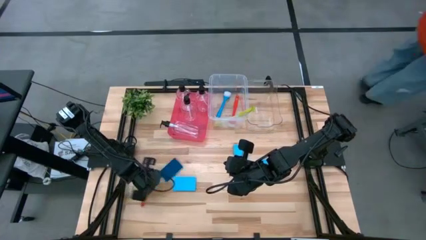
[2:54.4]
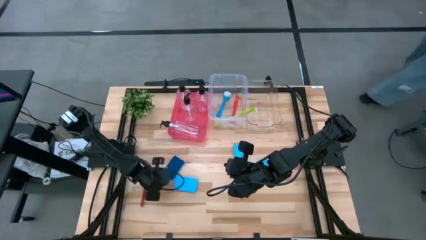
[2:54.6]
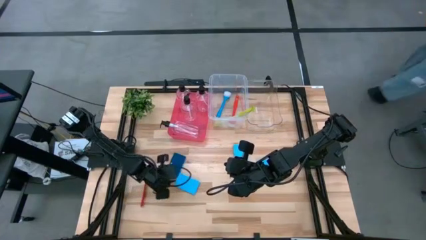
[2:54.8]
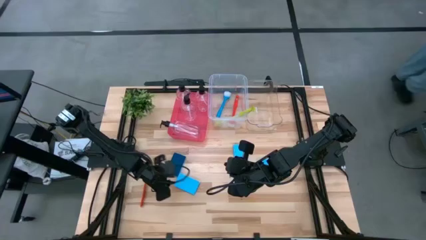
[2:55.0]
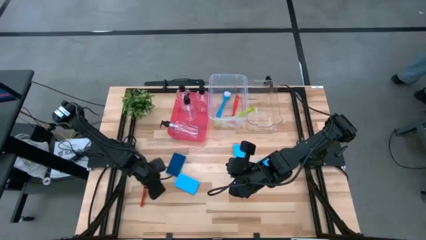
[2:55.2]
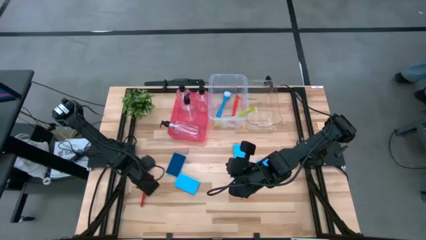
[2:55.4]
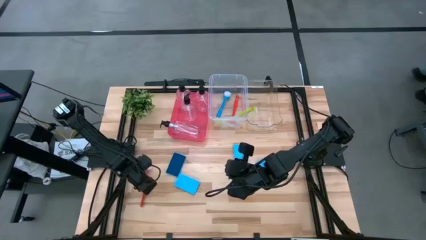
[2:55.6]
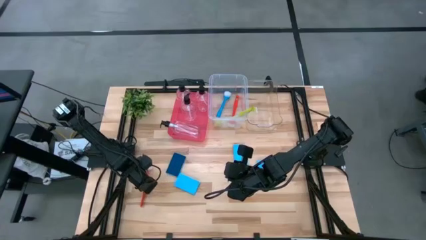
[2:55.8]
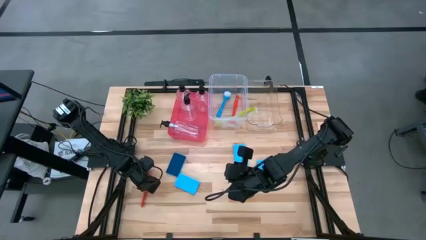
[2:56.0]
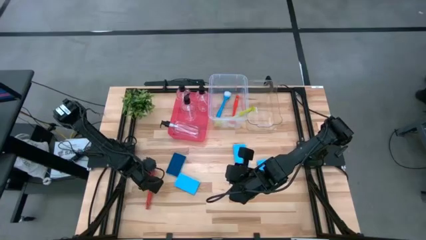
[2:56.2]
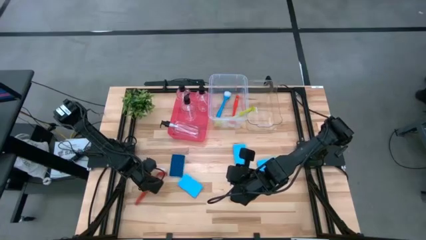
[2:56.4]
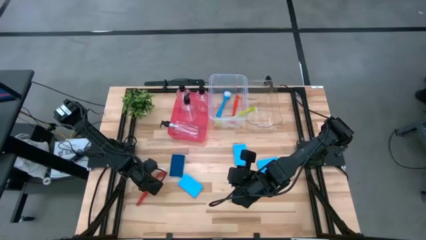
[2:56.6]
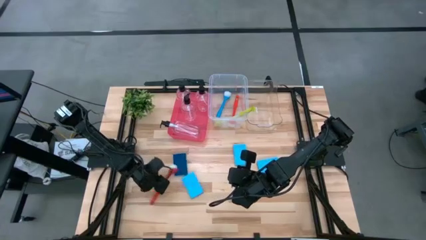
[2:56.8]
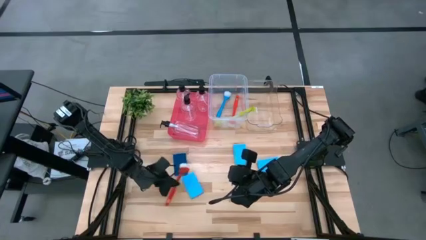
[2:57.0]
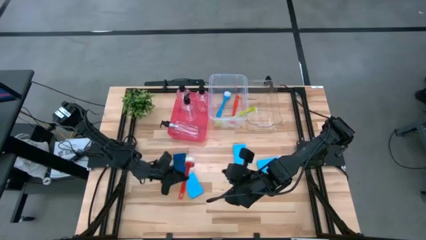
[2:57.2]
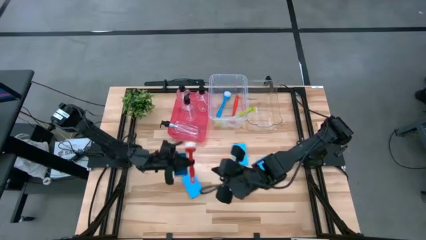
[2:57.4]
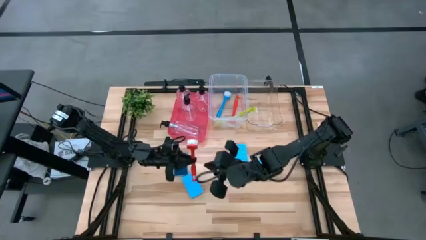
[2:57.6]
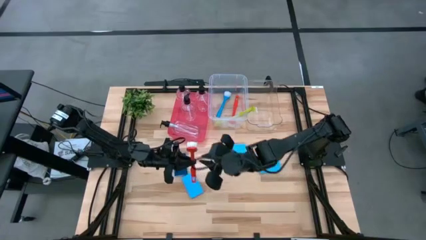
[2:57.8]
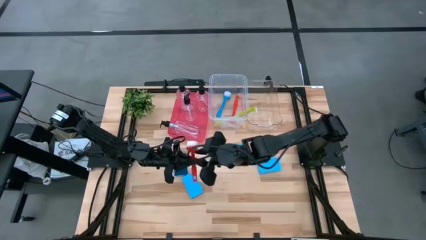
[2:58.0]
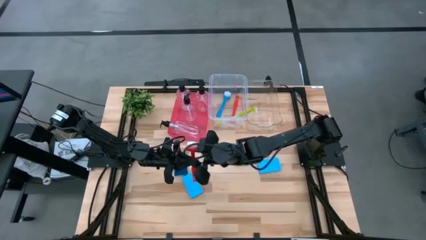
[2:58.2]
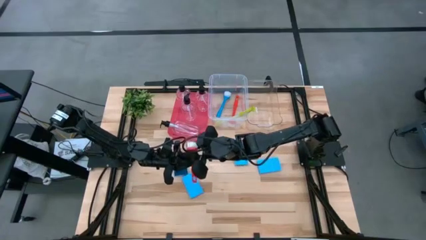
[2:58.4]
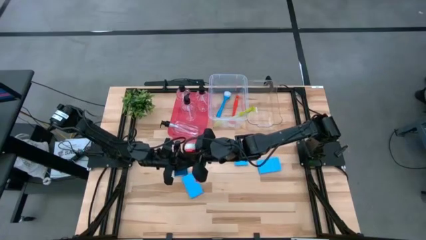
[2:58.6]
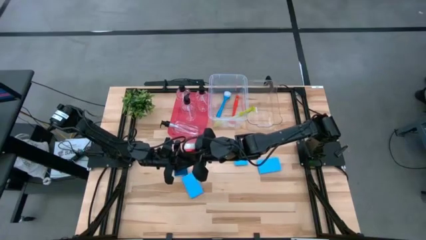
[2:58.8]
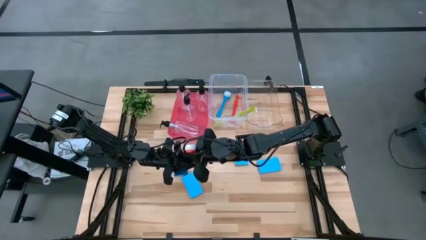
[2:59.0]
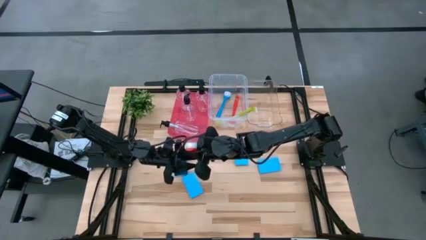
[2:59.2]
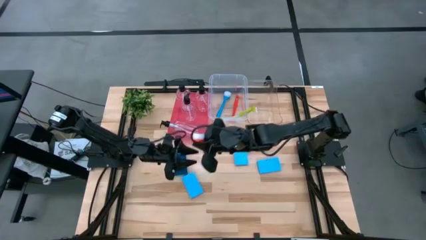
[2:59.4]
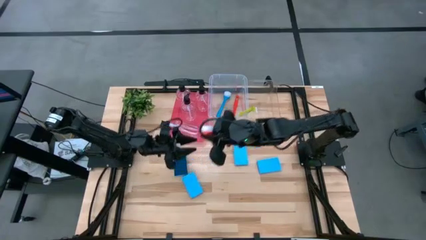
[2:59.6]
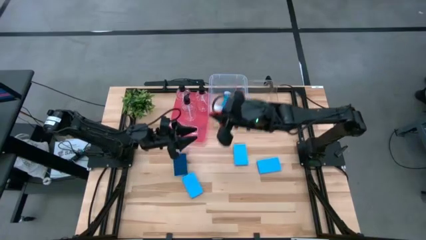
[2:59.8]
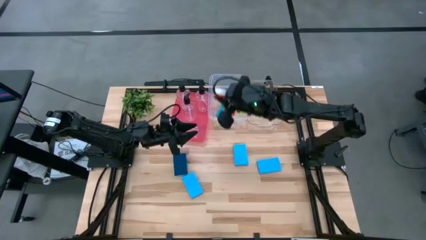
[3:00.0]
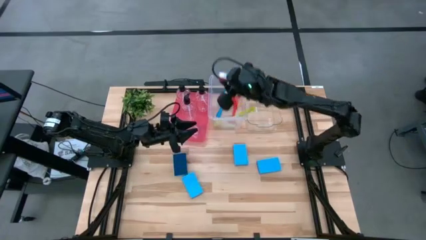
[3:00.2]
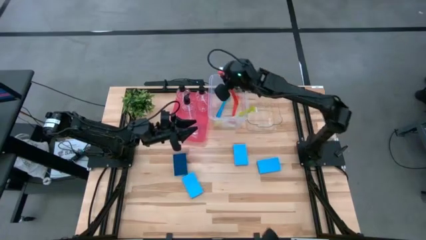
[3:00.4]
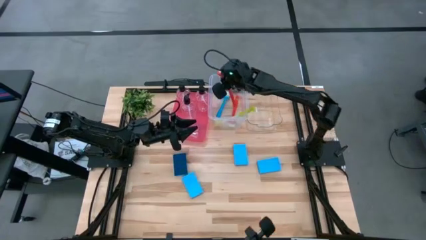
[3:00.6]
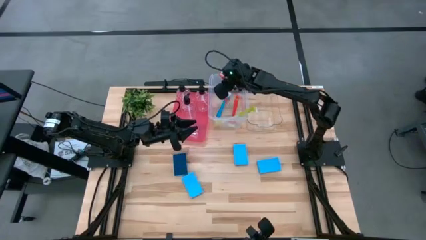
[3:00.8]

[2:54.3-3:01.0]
Task: Pick & Place Kitchen Sink Supplies
Put the red dishwashing brush into the transparent white bin

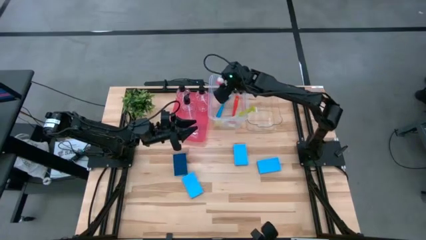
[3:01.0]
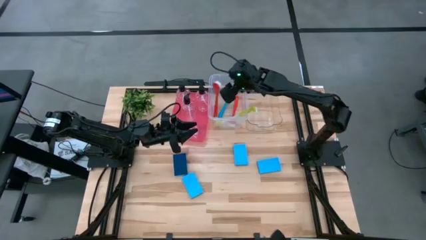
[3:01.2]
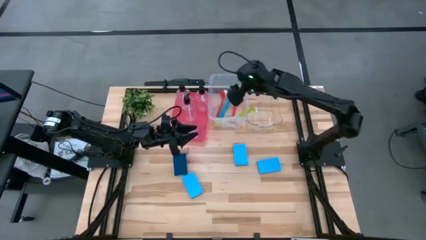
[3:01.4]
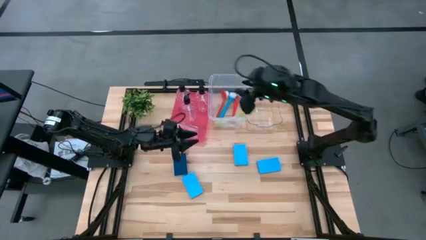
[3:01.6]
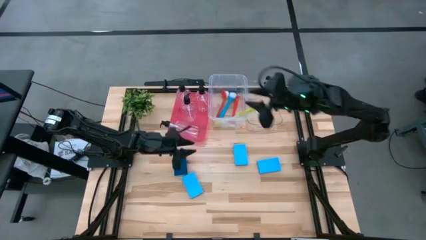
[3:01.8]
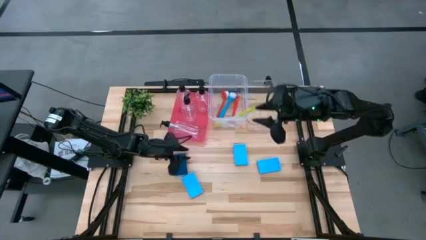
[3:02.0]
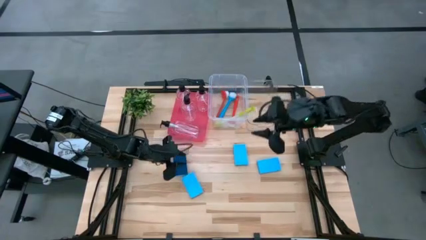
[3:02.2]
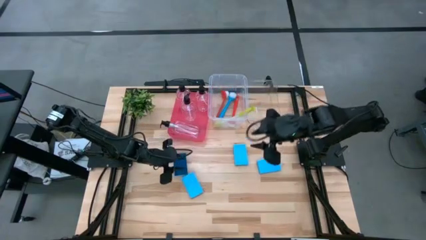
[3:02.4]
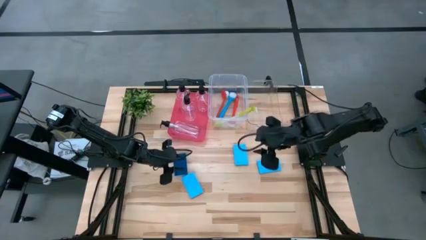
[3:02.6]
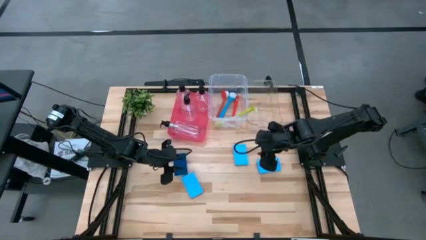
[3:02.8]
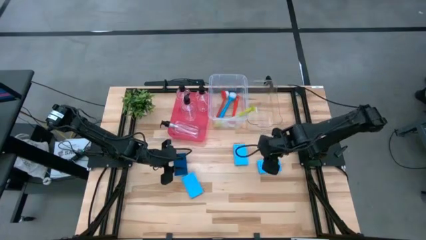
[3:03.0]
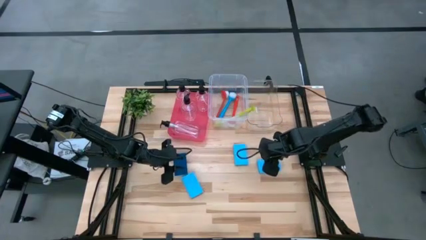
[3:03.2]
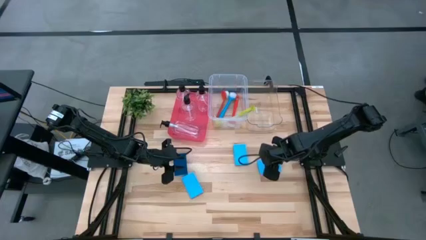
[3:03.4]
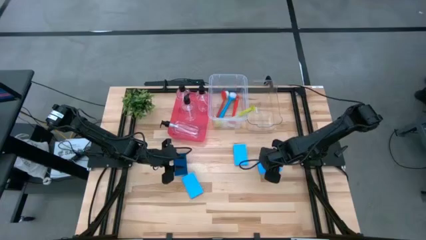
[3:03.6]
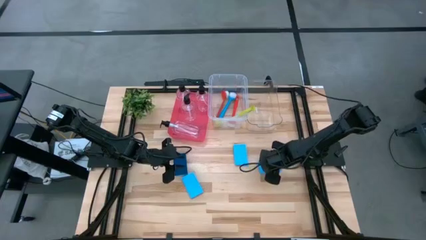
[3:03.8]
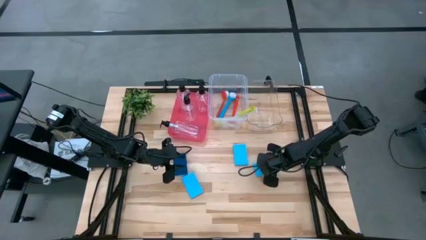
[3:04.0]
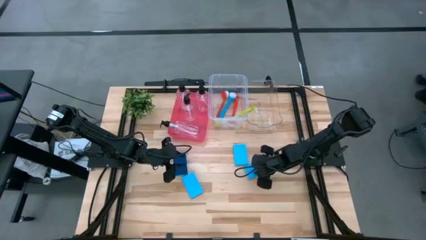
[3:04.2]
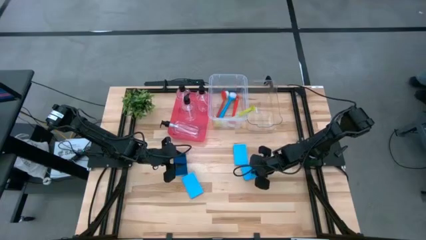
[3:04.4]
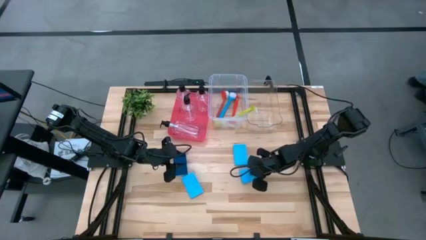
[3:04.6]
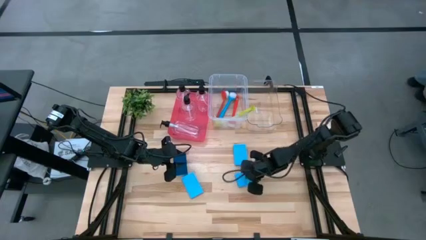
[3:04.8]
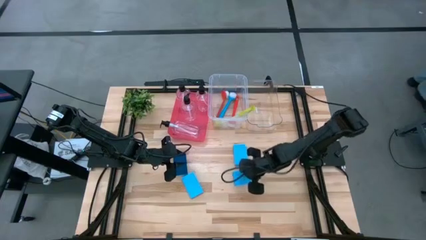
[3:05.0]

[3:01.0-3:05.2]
Put the bottom right blue sponge wipe into the transparent bin

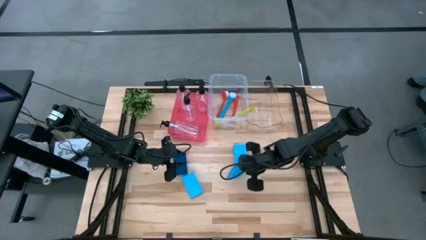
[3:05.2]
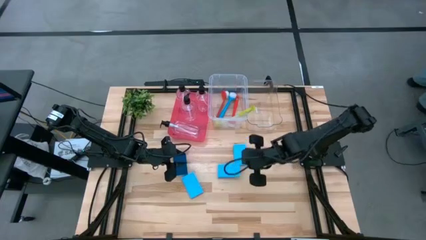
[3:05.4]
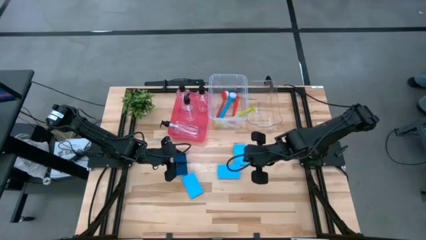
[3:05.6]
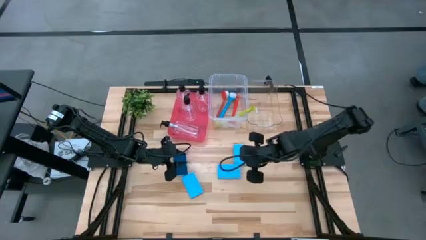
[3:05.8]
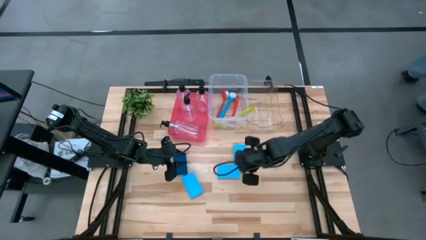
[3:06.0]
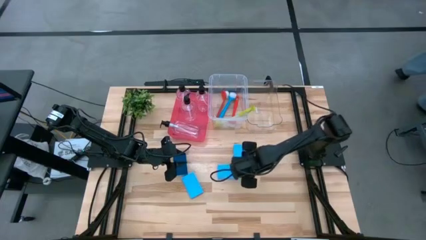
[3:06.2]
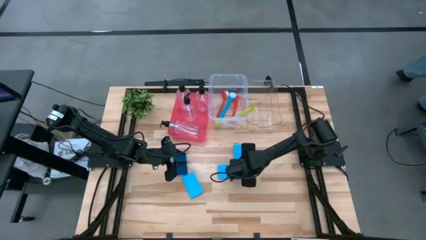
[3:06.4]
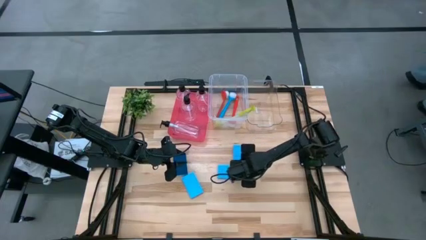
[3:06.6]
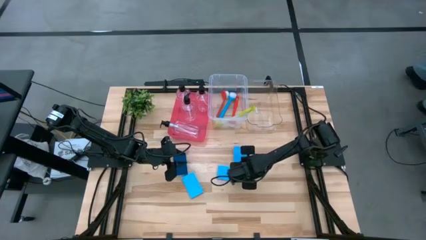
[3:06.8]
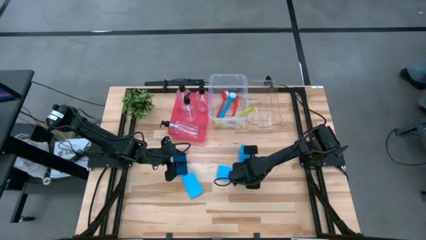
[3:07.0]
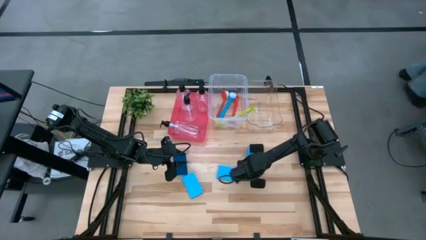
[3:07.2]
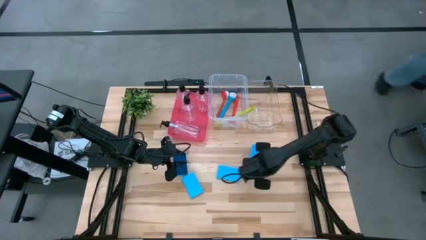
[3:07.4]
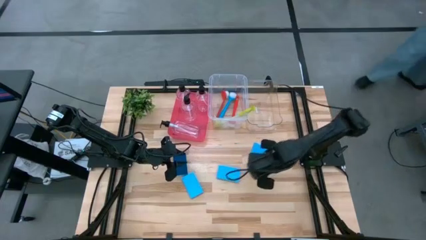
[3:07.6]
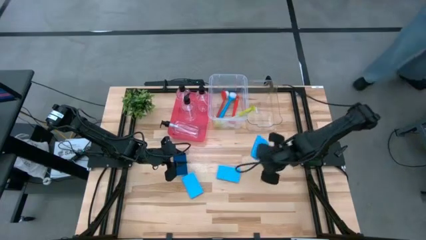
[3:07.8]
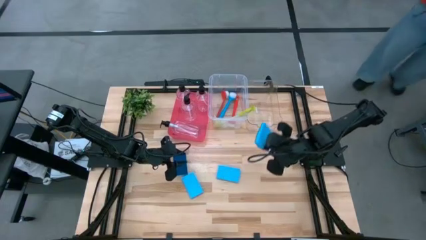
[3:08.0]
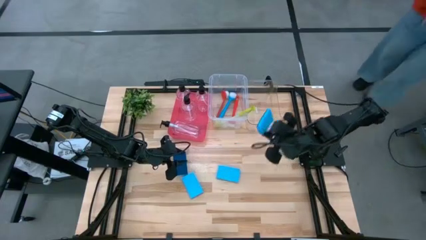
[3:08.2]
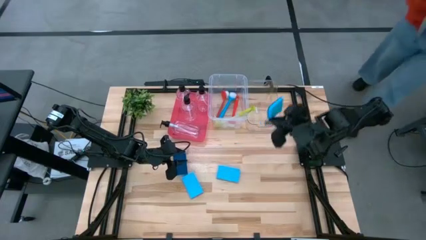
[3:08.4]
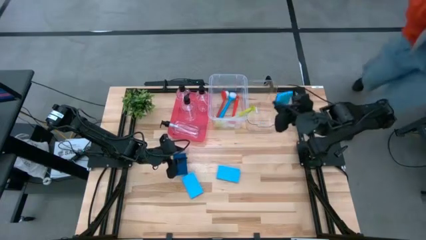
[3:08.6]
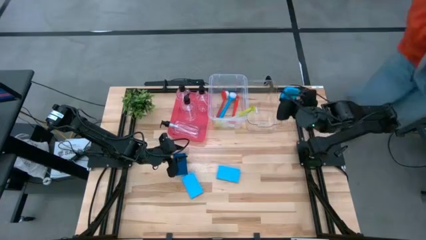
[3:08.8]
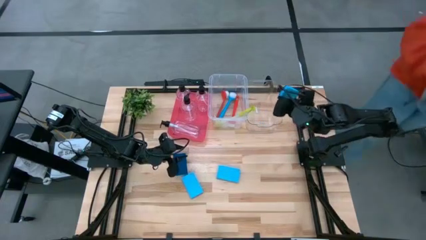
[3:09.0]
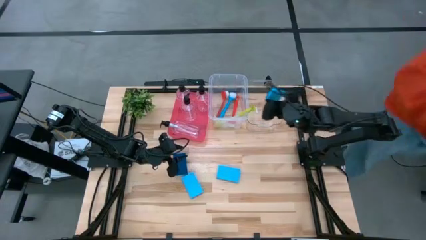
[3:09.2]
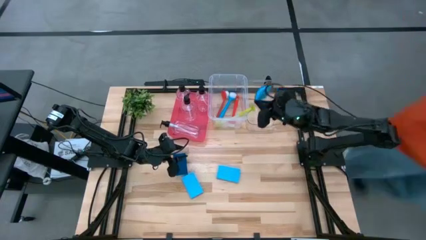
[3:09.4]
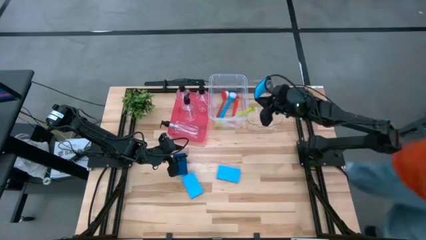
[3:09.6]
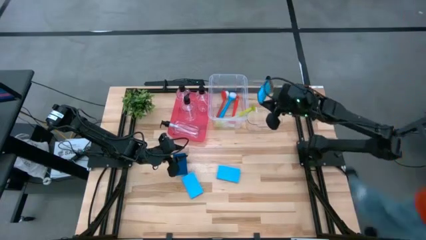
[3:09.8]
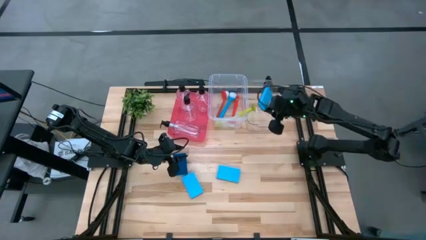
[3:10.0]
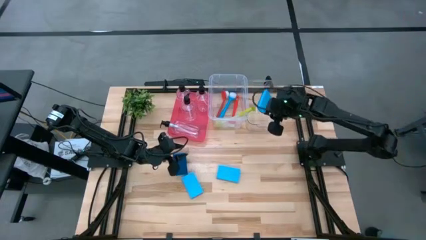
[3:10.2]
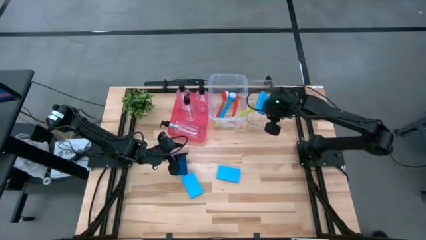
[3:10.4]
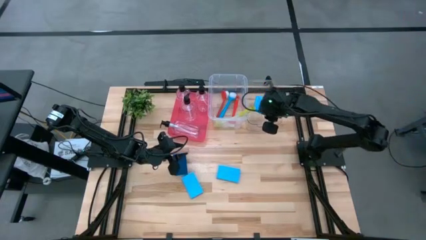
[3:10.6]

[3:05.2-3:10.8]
Put the top right blue sponge wipe into the transparent bin
